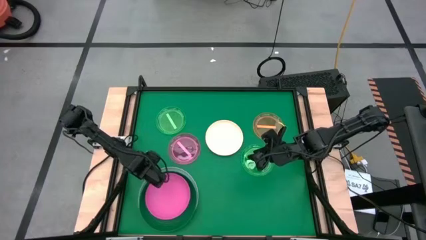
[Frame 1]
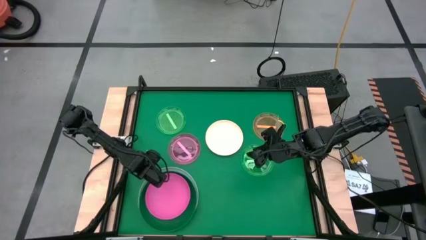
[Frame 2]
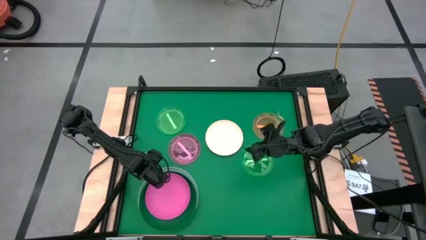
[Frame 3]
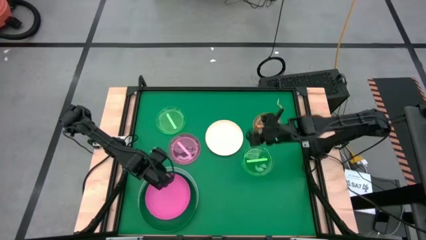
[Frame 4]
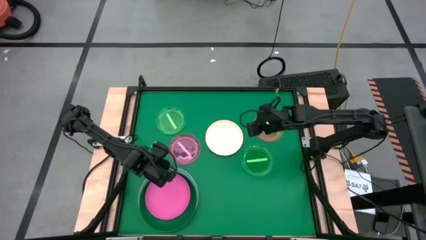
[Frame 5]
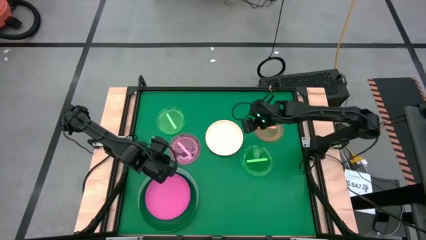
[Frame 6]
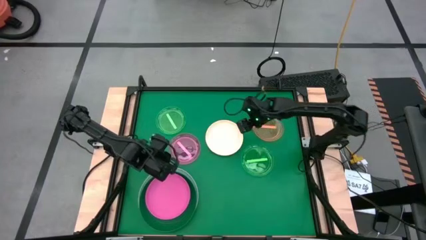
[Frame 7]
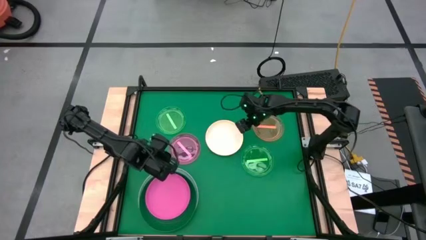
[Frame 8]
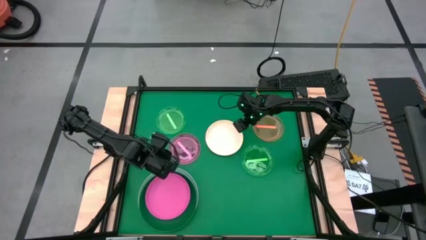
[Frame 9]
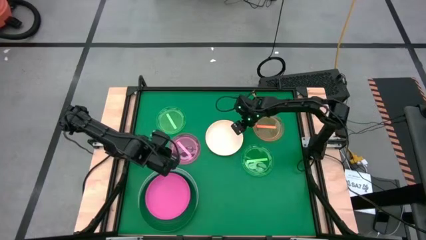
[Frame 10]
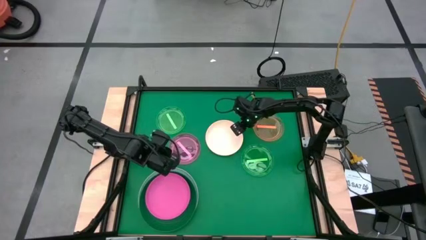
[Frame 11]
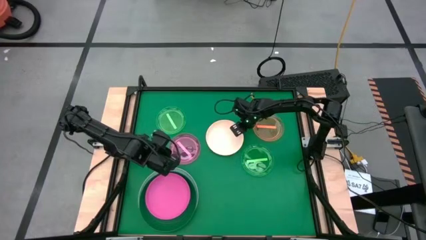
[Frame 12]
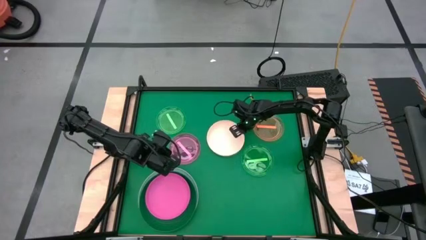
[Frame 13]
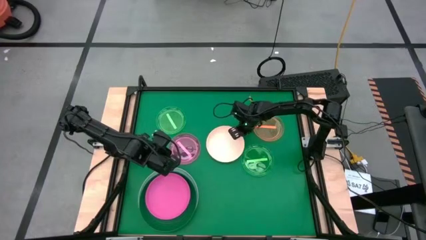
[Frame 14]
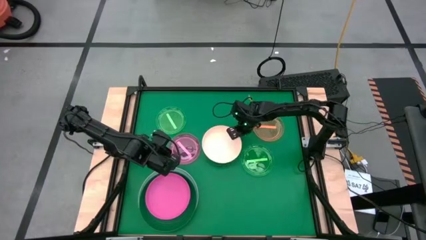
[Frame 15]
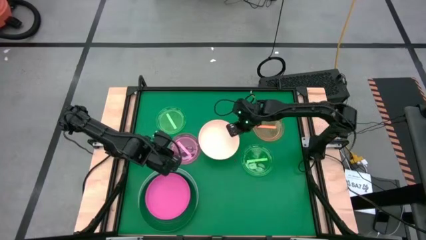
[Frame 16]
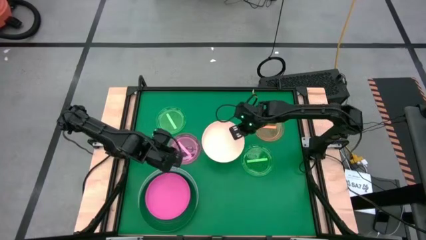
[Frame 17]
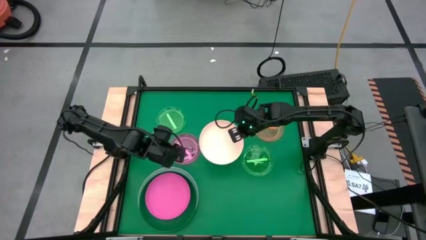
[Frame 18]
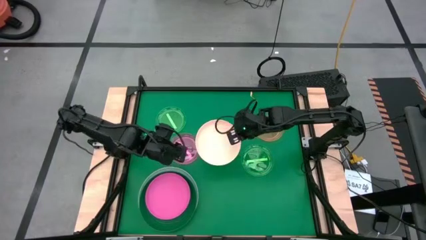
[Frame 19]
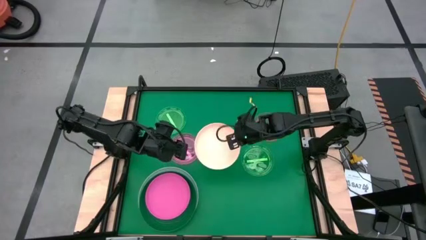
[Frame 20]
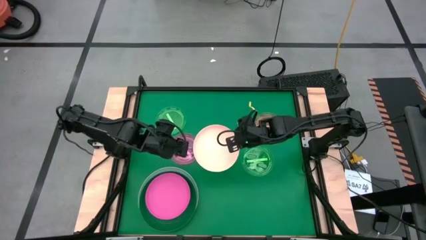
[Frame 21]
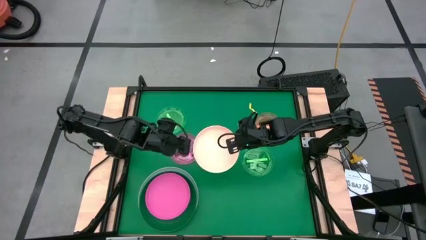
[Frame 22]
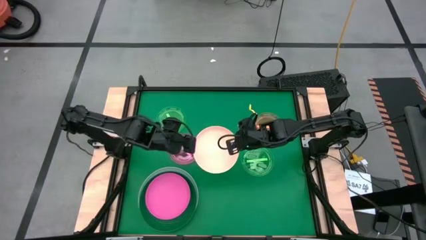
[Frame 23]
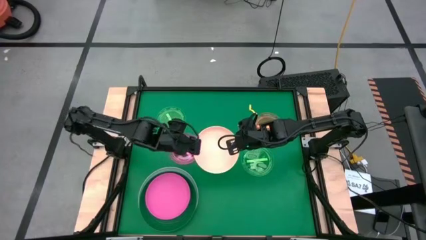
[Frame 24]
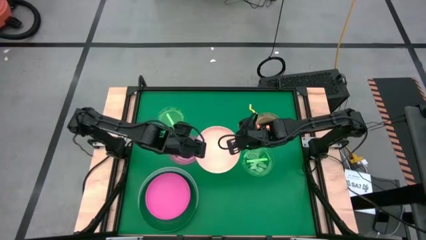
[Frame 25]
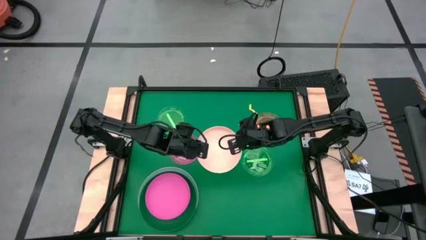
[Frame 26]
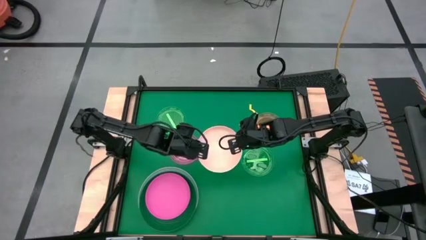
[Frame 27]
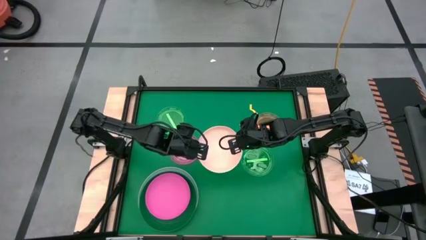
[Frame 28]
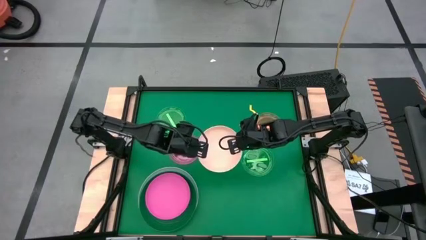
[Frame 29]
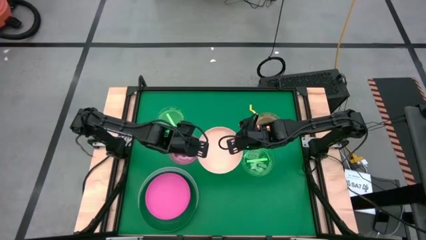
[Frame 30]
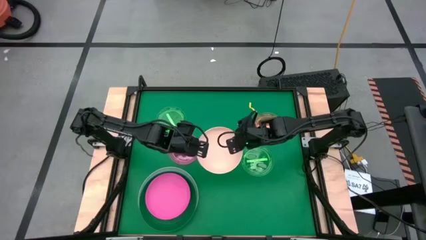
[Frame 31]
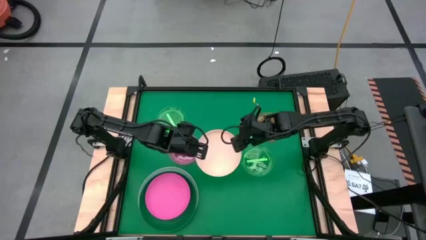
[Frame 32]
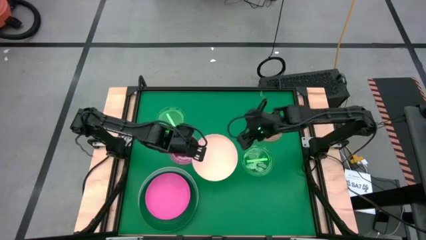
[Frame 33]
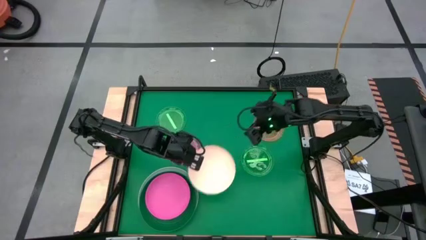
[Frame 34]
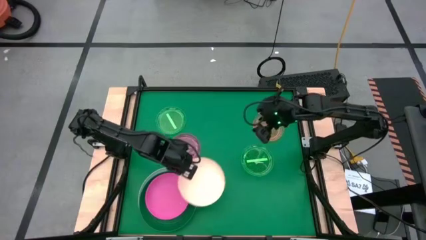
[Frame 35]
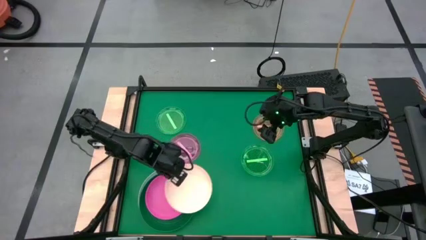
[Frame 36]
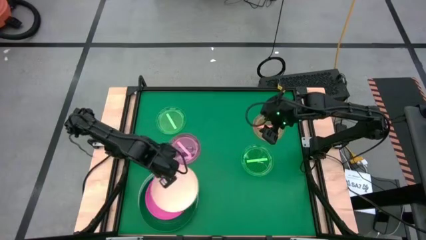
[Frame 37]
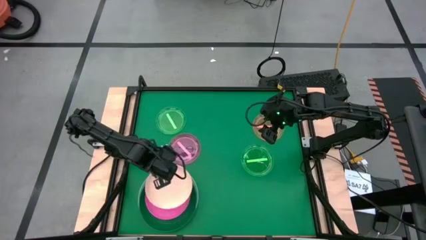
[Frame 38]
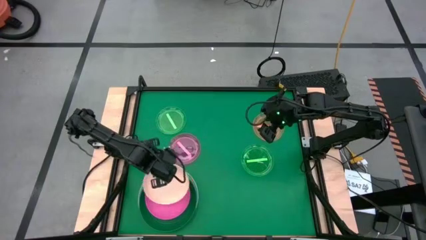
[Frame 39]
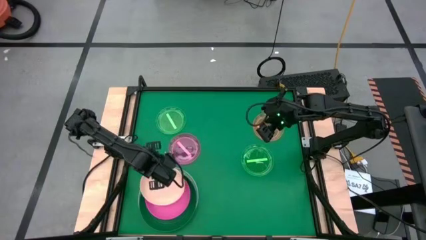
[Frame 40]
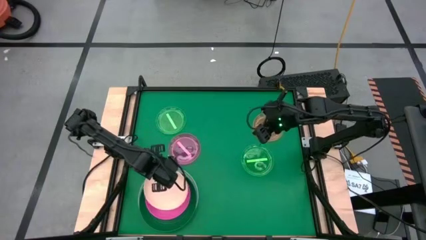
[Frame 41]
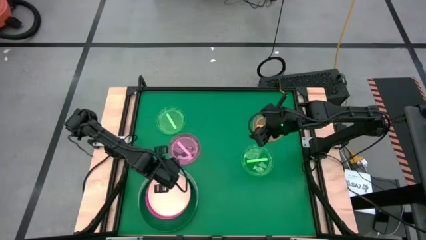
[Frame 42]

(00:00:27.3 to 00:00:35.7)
Task: Stack plastic plates
Stack the white plate on top of the medium pink plate

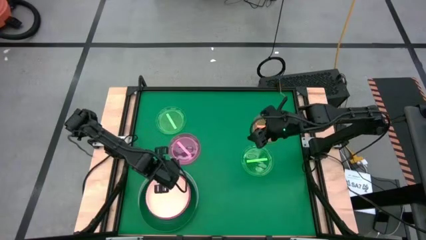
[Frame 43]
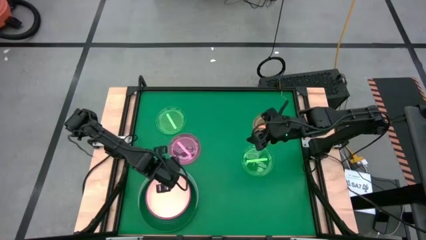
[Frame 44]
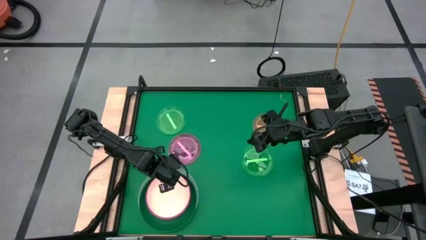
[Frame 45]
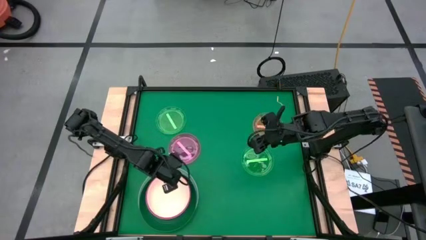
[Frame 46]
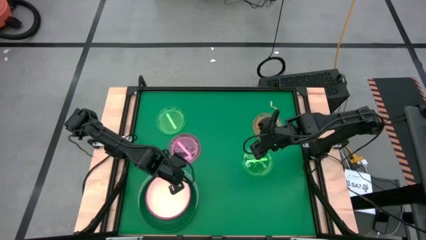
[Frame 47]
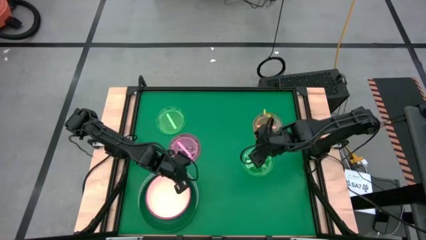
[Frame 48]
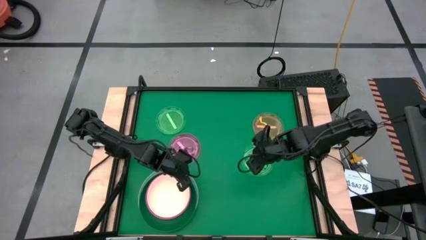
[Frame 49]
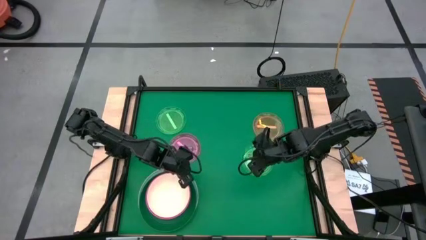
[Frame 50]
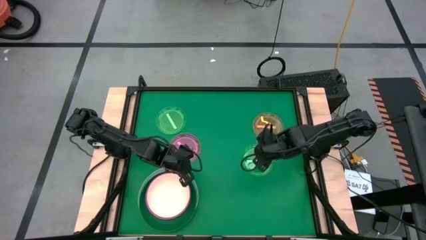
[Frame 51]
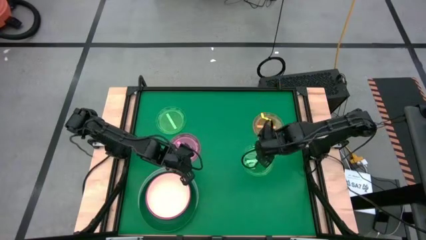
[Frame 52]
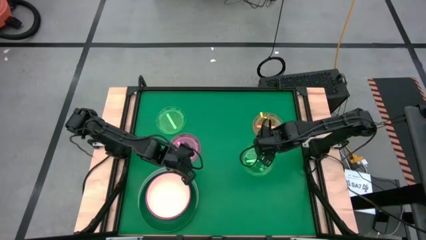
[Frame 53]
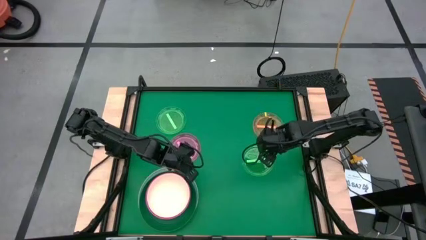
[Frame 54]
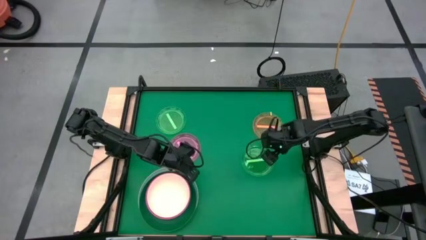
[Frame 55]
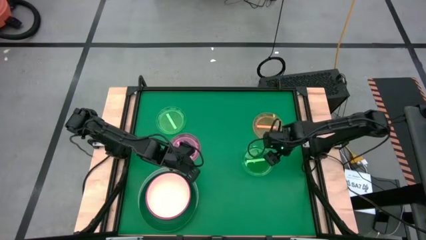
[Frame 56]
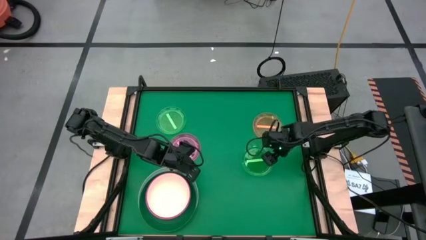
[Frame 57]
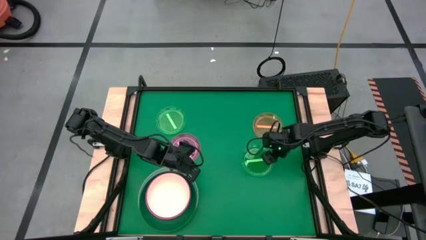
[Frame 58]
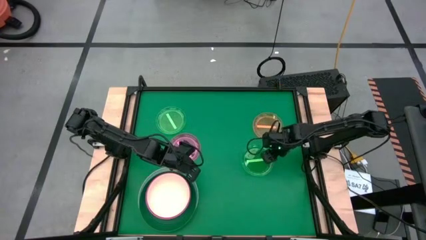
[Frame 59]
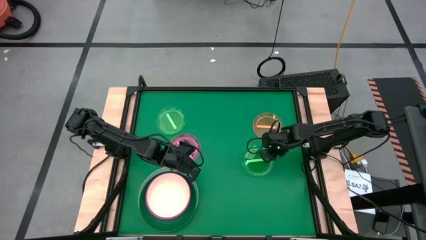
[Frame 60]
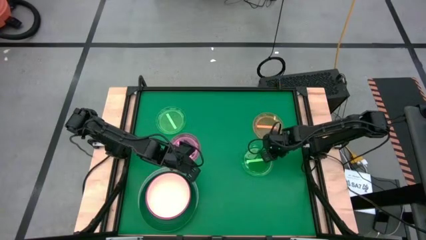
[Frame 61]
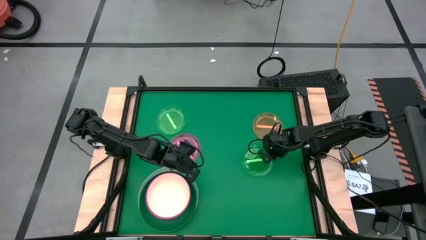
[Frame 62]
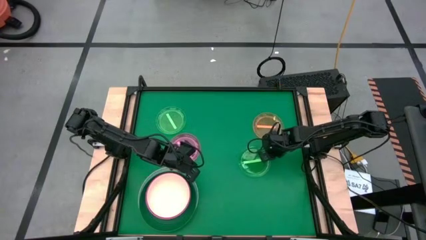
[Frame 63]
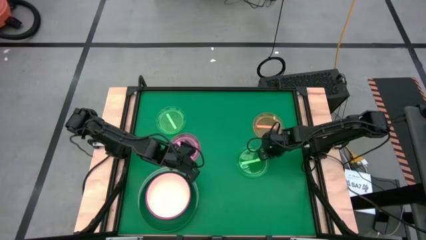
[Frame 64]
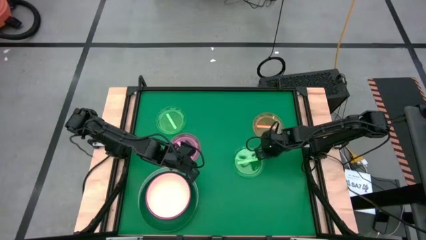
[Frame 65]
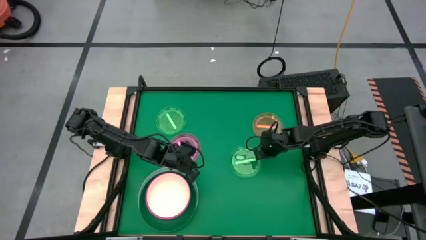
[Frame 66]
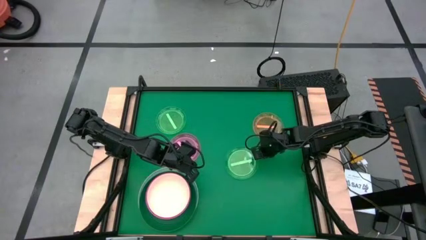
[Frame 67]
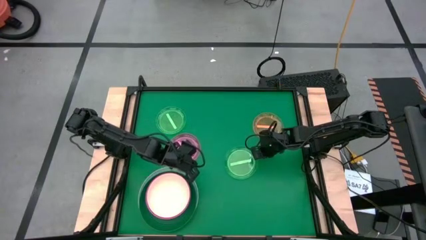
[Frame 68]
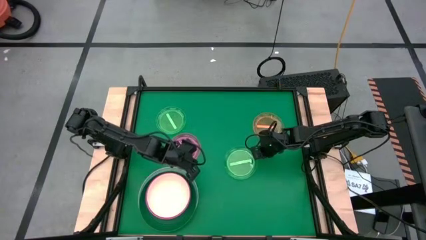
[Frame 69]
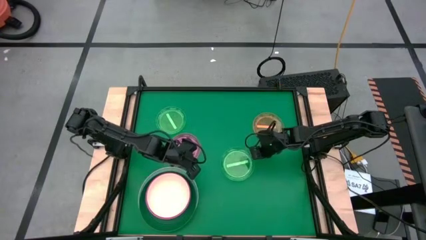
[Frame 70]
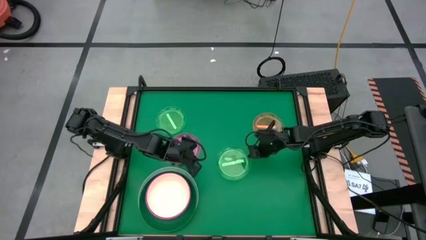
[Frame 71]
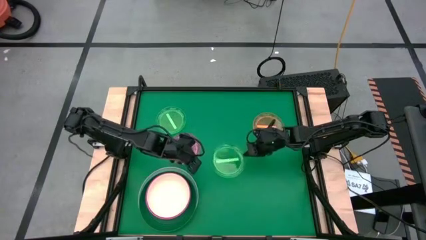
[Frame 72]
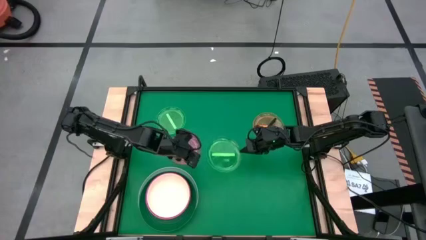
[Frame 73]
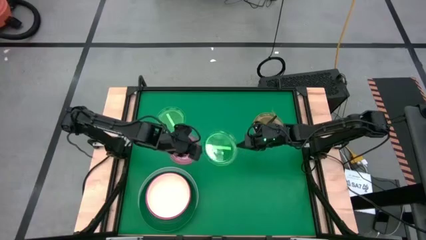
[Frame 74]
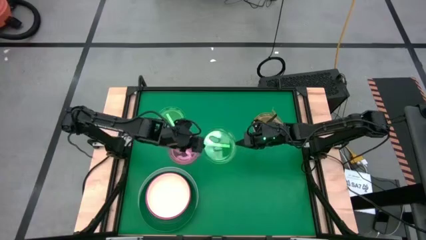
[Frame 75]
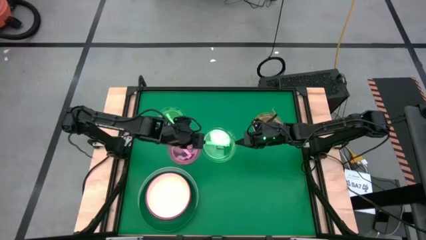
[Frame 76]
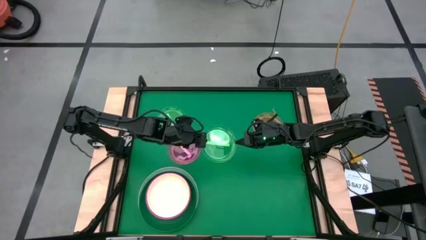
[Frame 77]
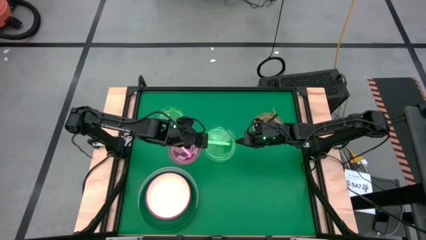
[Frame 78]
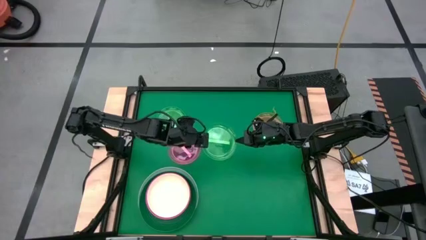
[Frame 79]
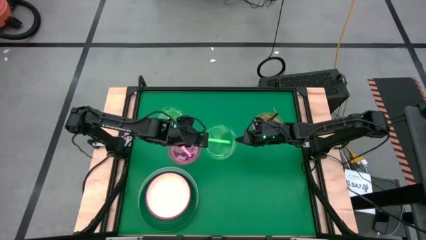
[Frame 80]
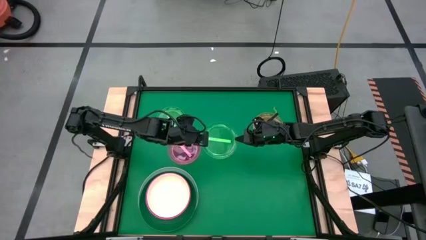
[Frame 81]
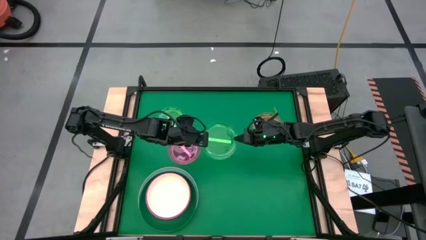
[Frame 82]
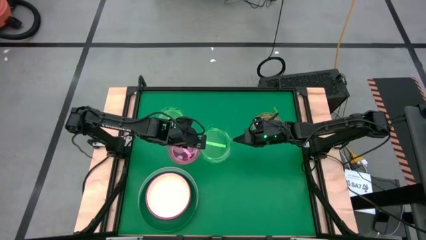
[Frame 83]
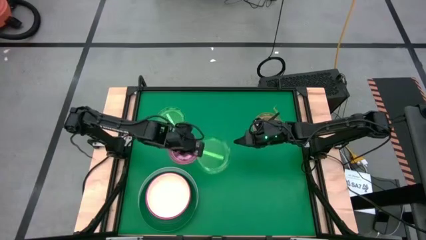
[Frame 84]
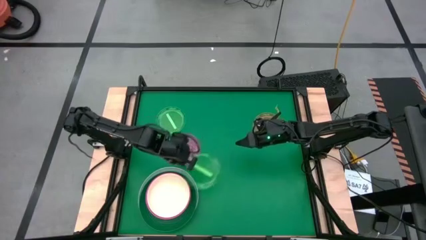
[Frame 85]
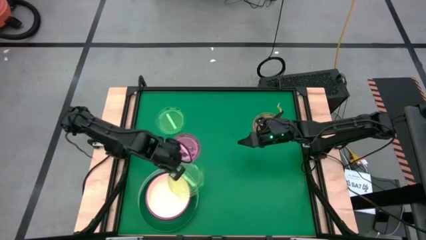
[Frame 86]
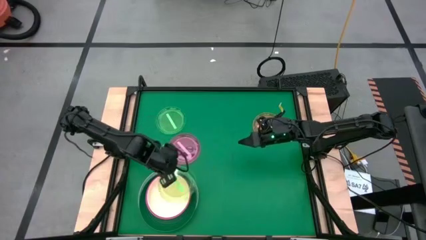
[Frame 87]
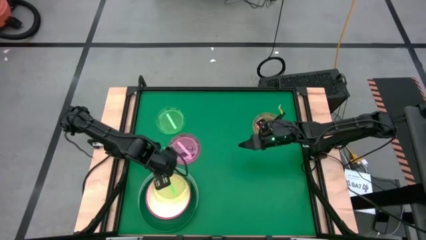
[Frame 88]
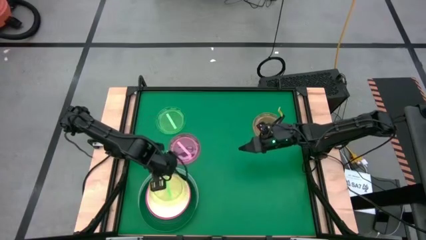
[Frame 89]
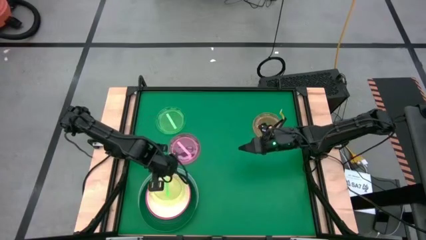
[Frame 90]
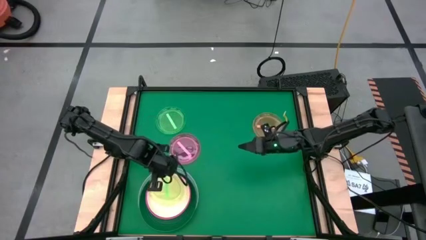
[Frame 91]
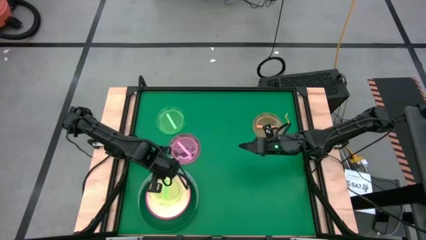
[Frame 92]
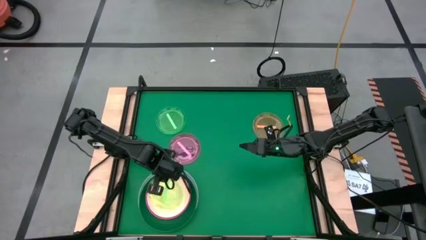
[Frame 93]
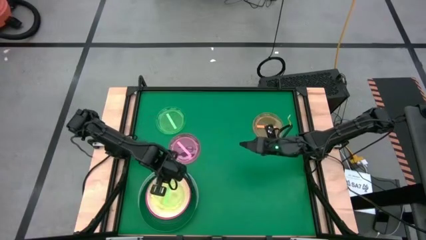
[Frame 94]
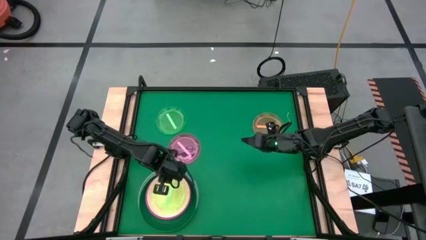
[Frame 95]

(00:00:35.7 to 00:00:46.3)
Stack the right small green plate on top of the medium white plate
